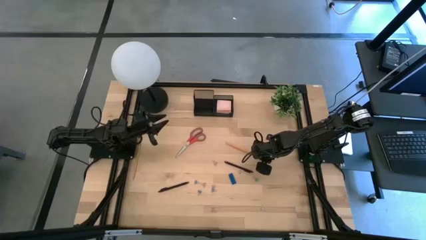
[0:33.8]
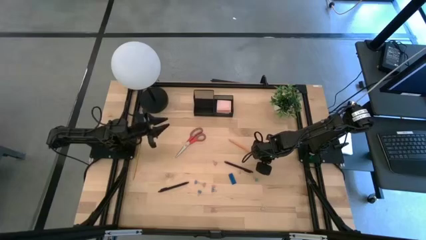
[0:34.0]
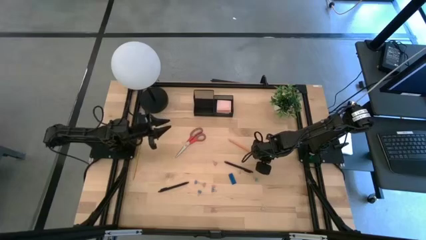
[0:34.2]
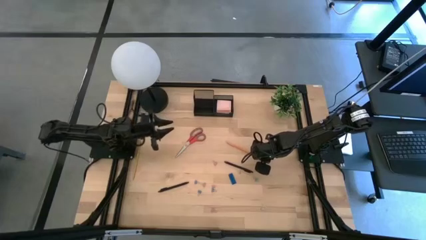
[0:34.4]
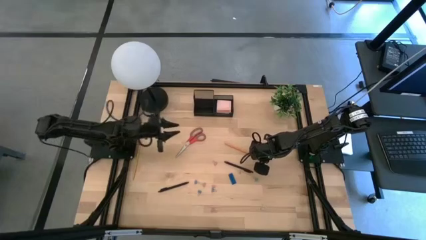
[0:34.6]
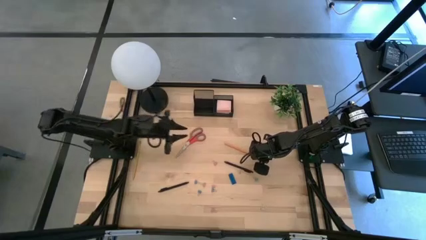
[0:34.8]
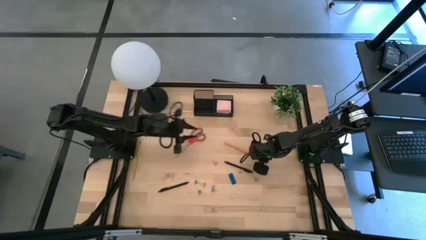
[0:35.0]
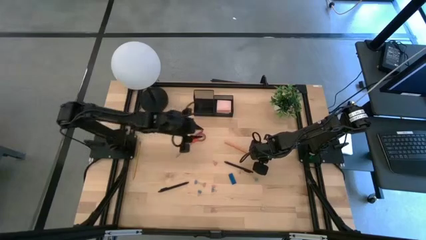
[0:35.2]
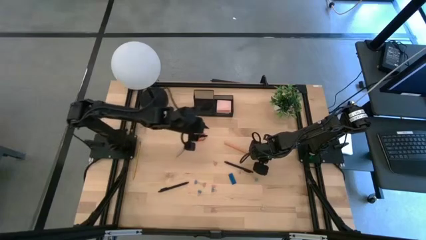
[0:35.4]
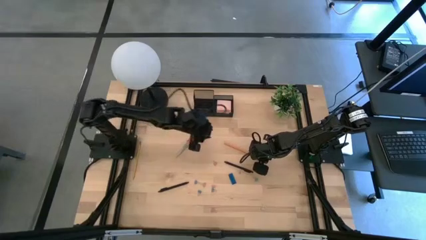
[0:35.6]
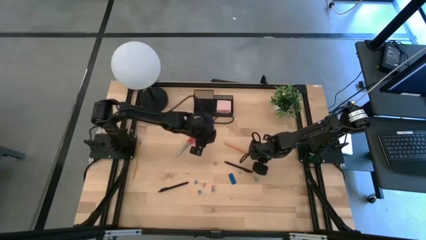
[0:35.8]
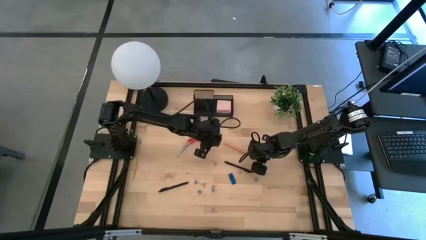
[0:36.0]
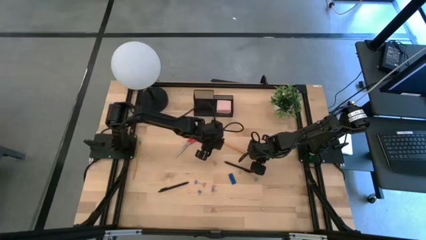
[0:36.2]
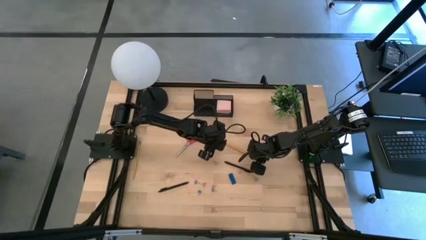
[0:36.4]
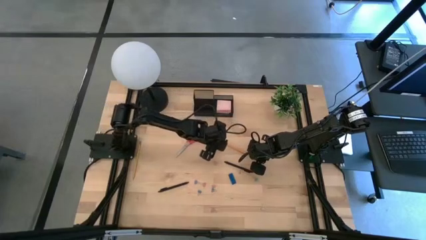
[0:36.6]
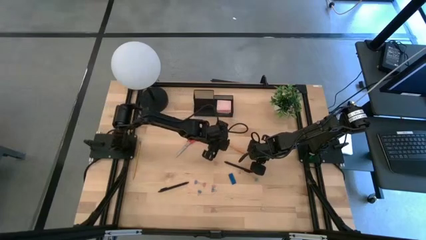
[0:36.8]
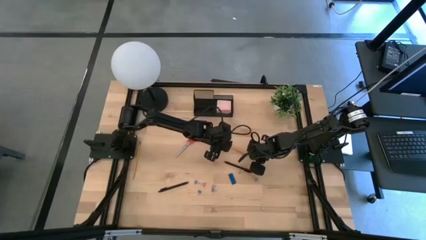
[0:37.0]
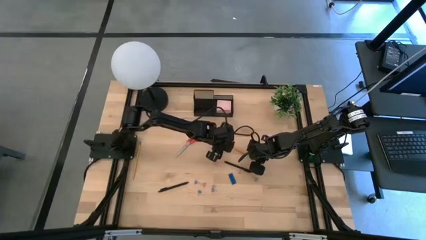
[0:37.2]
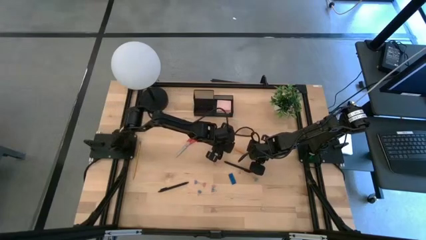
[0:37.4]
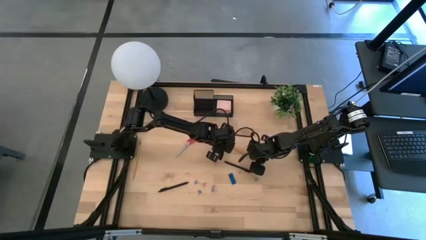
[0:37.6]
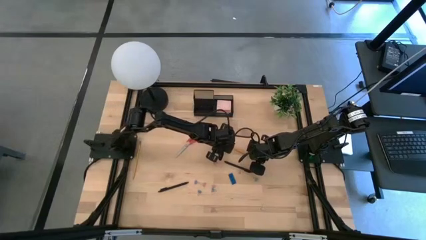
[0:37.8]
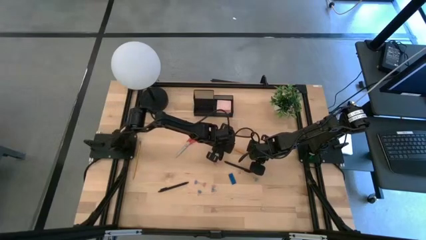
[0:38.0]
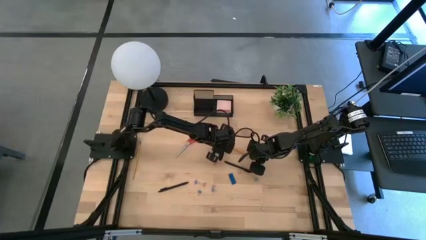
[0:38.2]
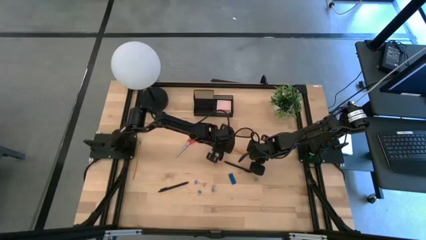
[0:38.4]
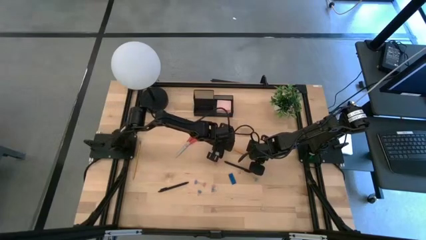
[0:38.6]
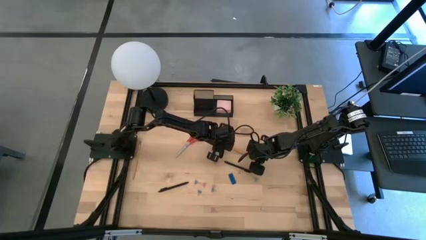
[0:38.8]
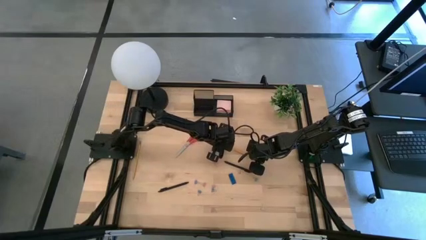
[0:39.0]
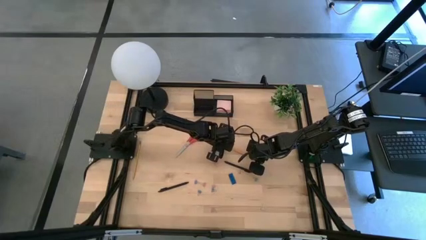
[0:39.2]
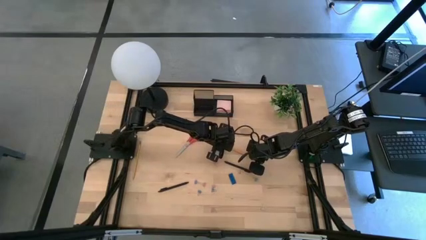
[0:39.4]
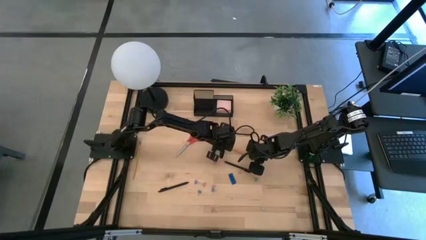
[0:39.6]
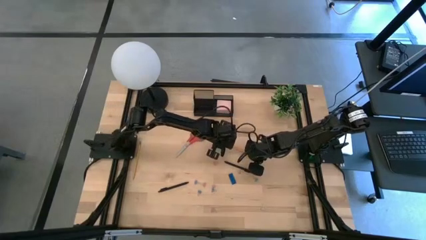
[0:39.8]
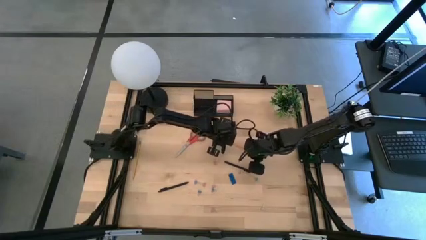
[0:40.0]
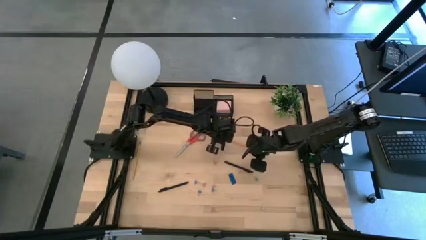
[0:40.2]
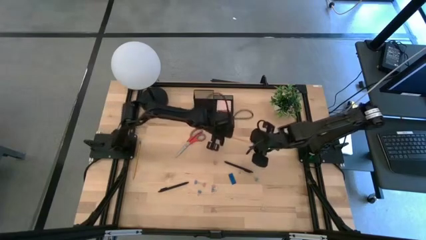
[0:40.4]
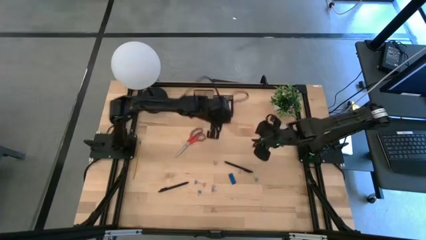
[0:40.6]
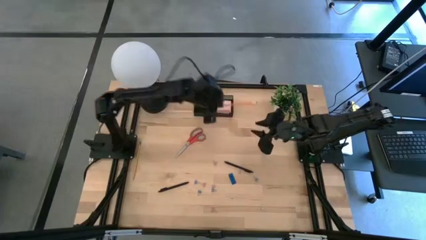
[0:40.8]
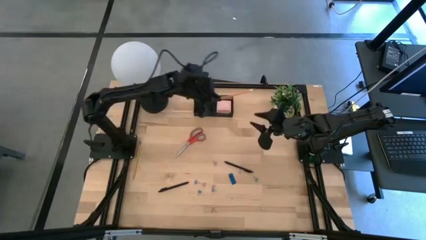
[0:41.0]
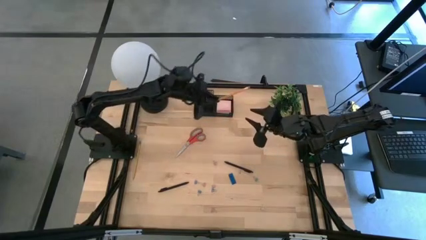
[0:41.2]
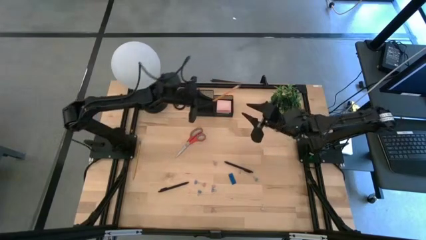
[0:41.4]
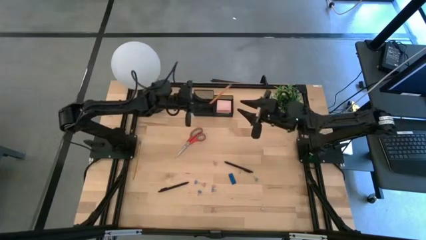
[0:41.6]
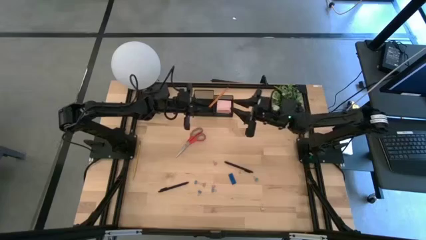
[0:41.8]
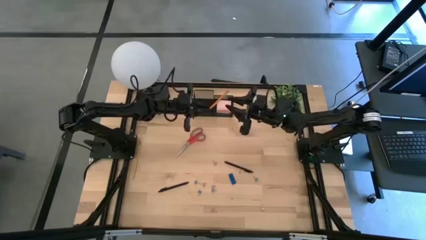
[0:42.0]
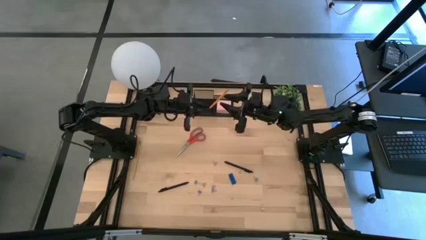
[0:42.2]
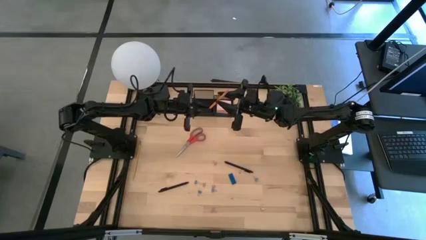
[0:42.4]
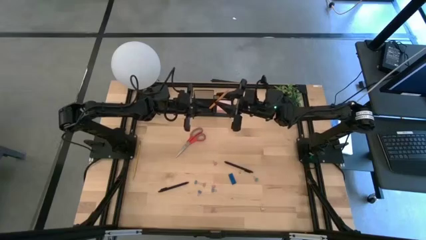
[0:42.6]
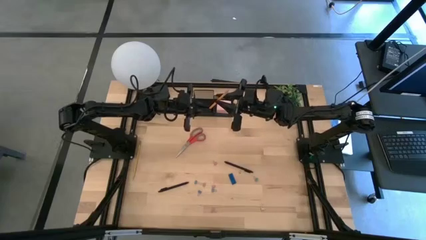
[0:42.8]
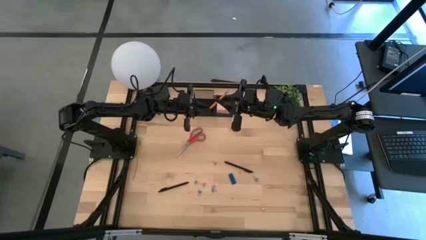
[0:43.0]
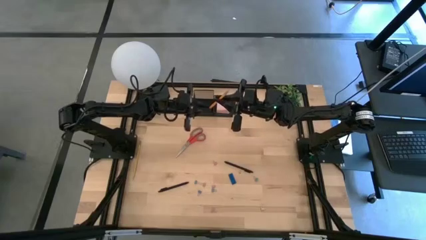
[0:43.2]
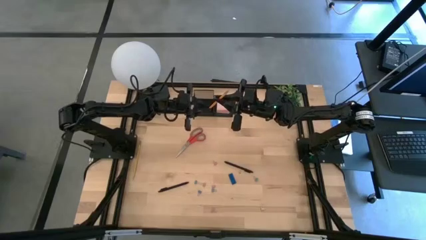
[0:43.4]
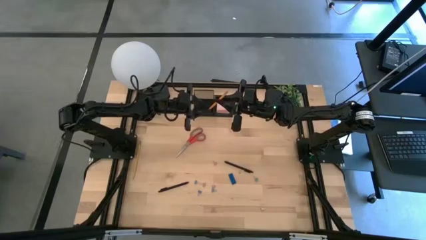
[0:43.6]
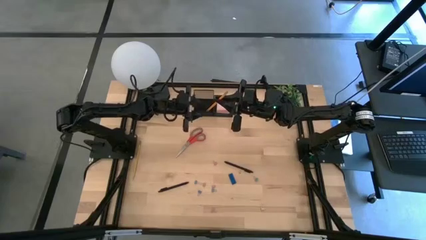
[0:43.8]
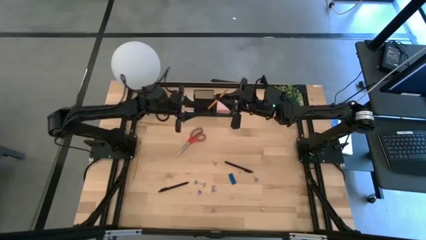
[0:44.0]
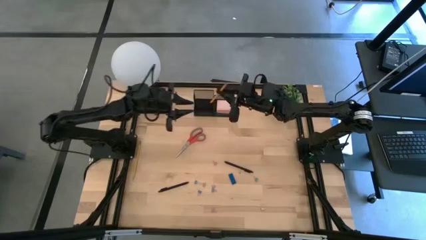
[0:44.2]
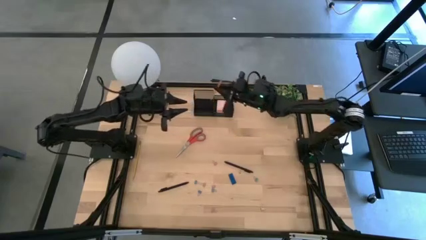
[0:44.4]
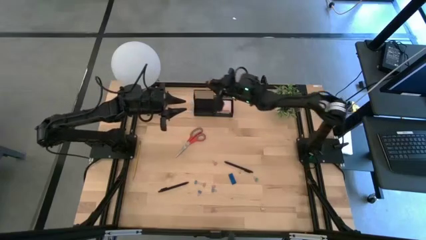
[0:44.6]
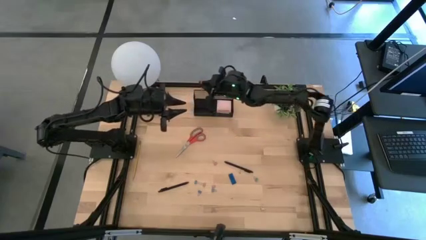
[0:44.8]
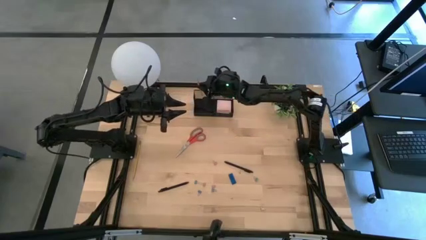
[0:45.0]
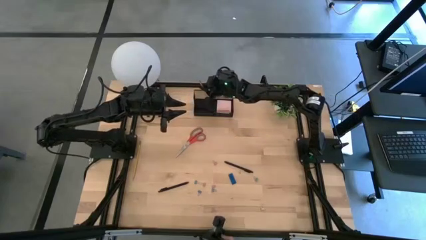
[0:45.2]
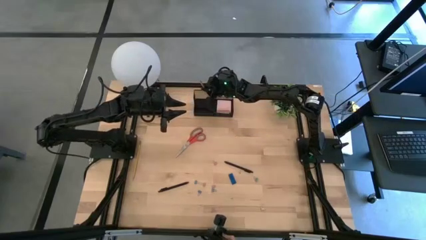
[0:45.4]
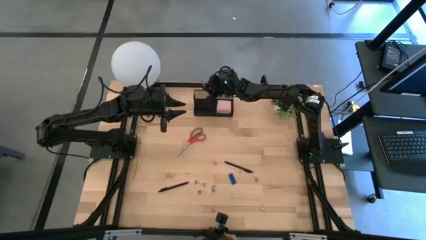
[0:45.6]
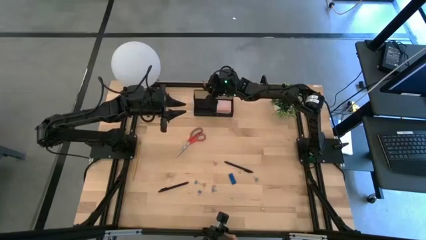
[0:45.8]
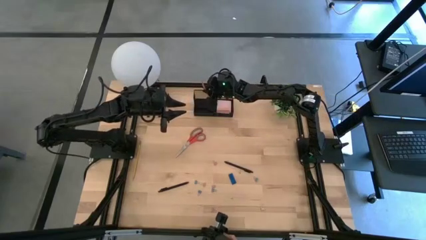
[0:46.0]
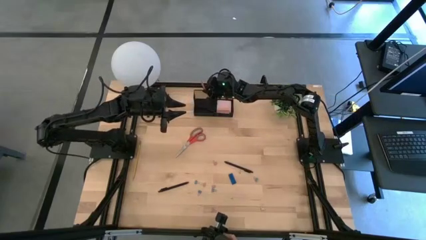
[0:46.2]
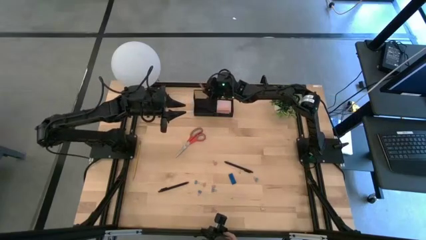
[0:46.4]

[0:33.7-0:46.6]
Task: Pick and place office supplies into organizer
Put the orange pencil into the black desk organizer
